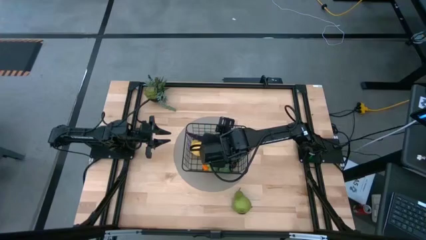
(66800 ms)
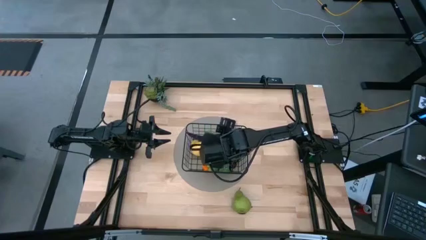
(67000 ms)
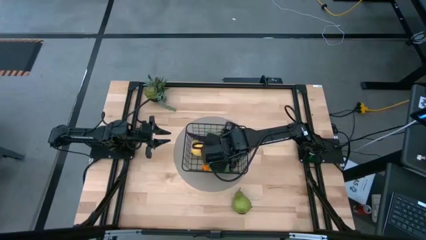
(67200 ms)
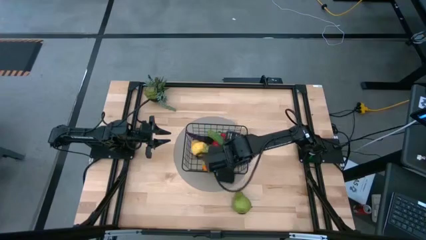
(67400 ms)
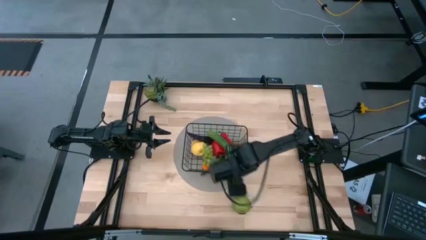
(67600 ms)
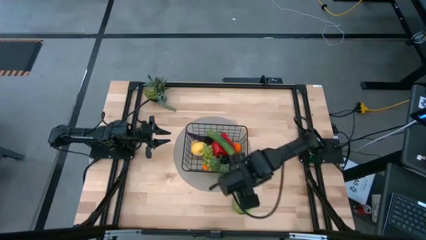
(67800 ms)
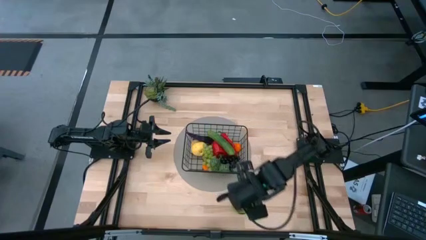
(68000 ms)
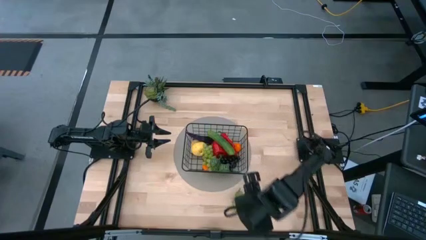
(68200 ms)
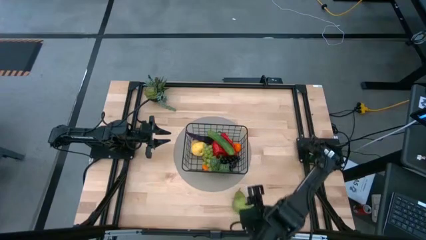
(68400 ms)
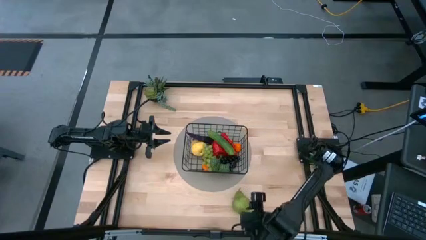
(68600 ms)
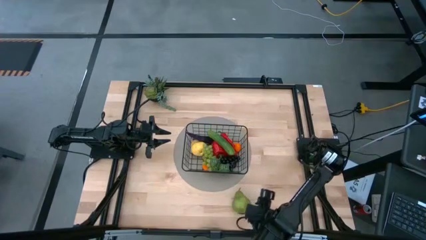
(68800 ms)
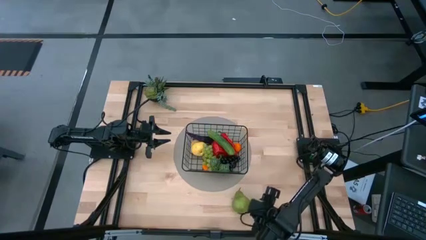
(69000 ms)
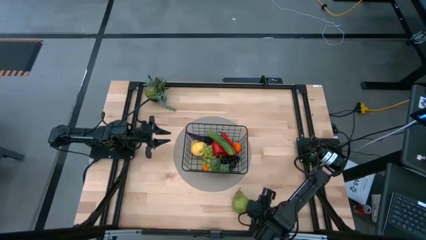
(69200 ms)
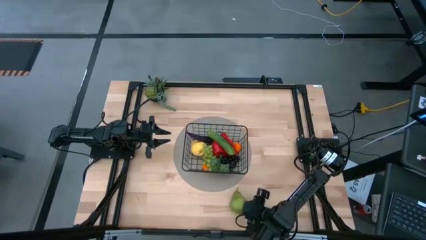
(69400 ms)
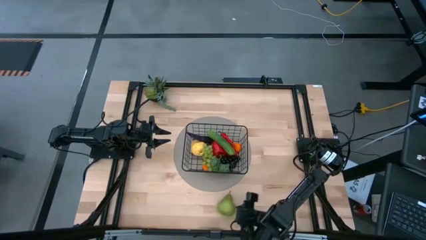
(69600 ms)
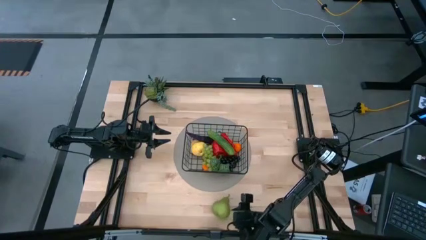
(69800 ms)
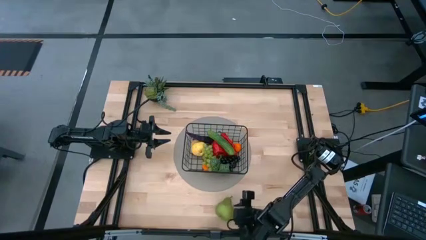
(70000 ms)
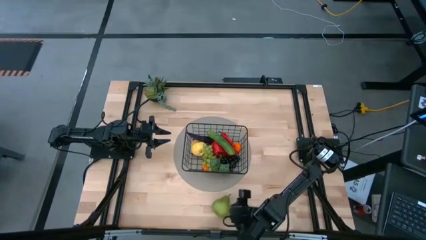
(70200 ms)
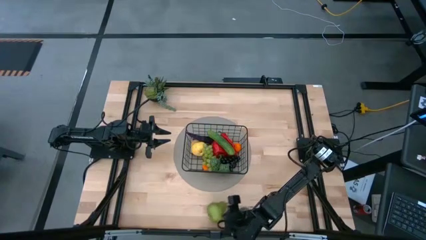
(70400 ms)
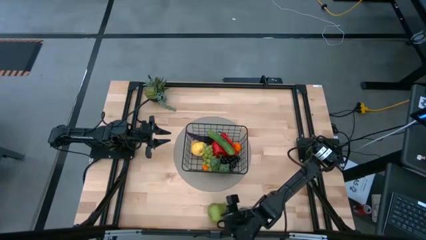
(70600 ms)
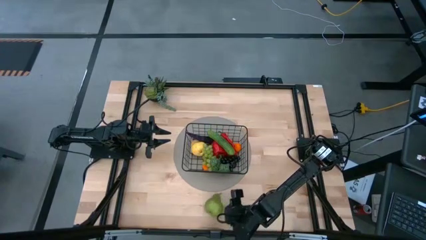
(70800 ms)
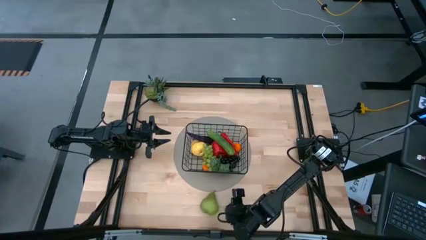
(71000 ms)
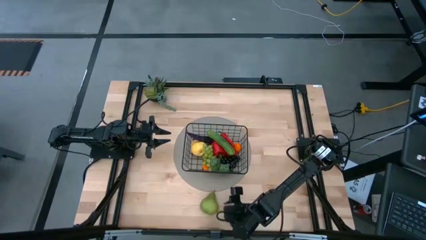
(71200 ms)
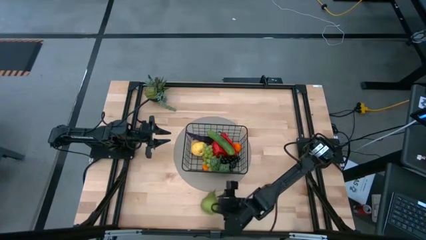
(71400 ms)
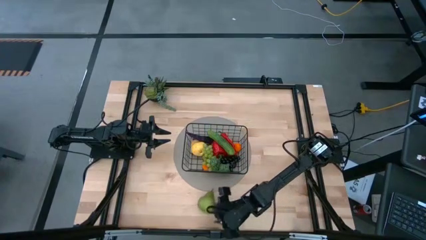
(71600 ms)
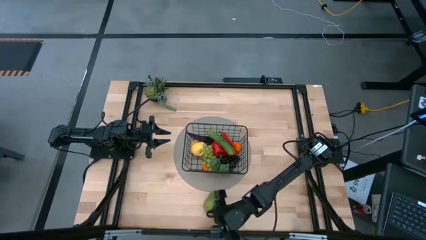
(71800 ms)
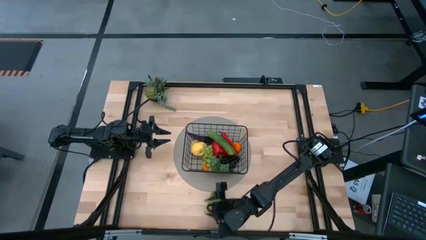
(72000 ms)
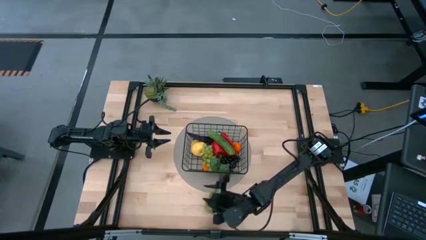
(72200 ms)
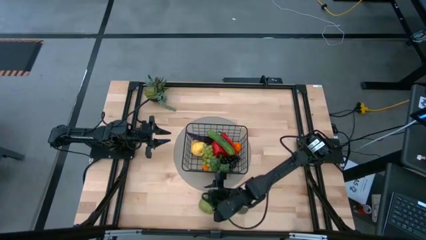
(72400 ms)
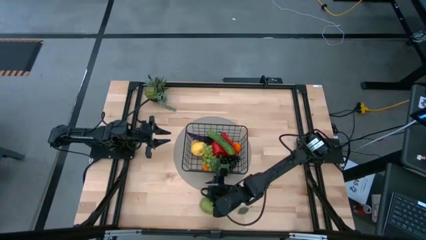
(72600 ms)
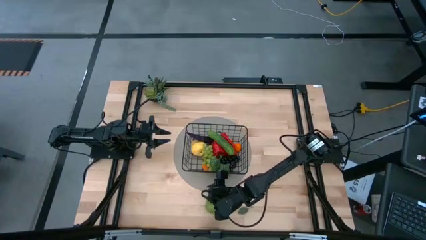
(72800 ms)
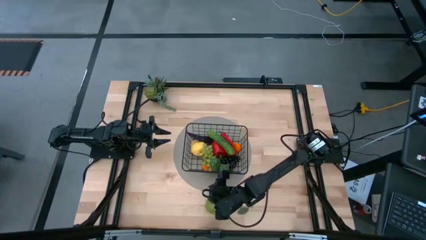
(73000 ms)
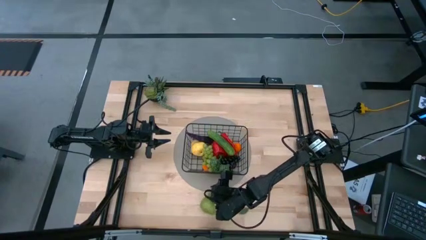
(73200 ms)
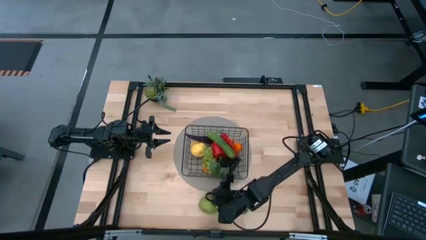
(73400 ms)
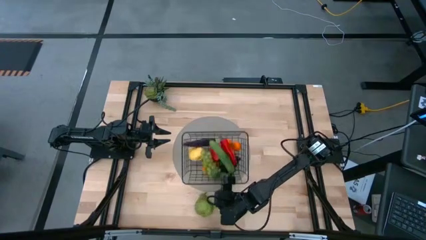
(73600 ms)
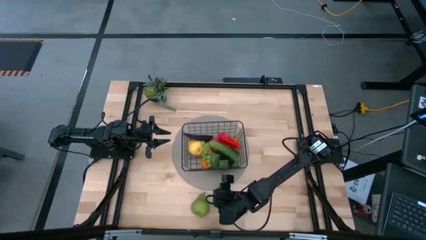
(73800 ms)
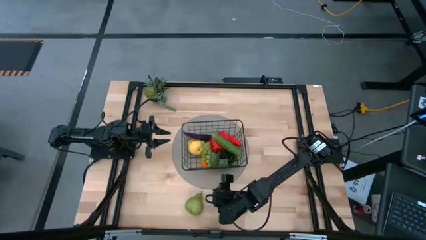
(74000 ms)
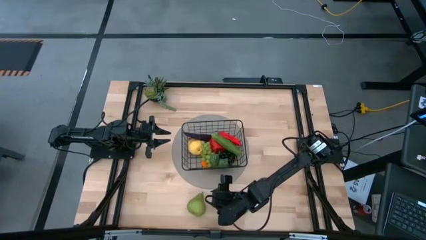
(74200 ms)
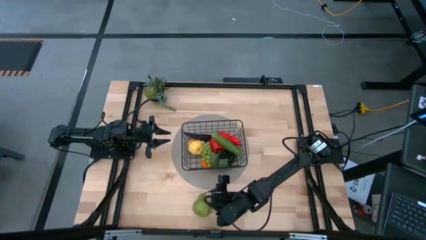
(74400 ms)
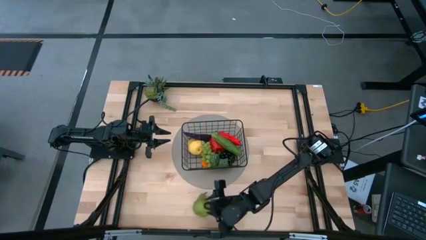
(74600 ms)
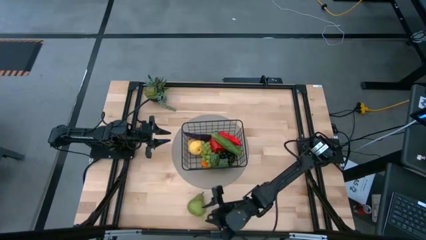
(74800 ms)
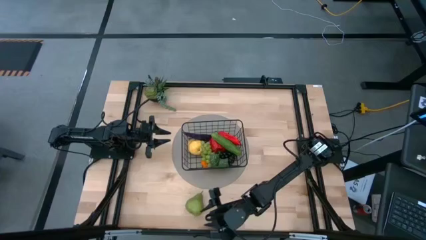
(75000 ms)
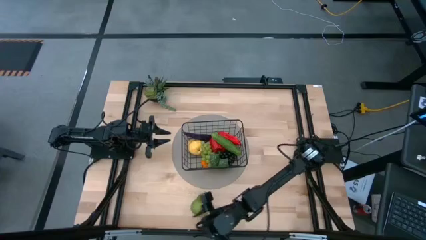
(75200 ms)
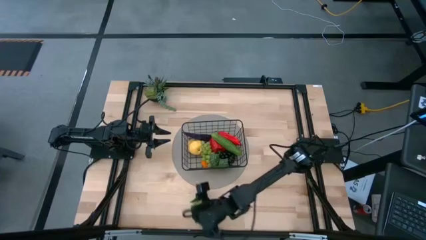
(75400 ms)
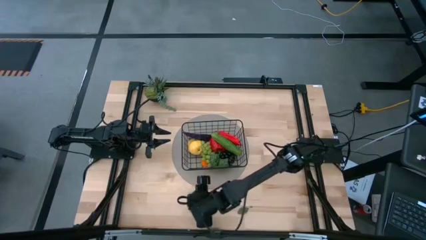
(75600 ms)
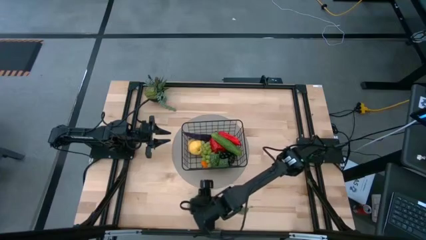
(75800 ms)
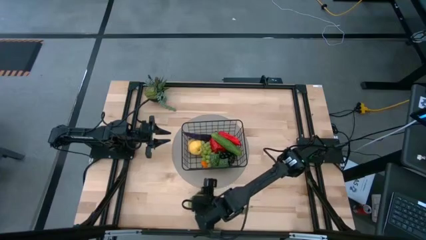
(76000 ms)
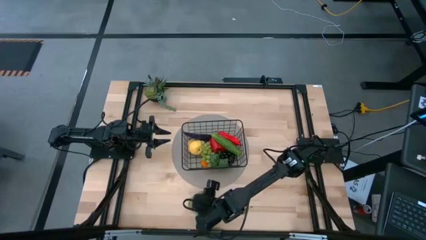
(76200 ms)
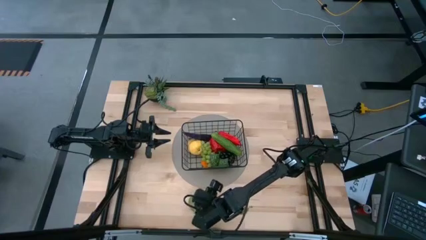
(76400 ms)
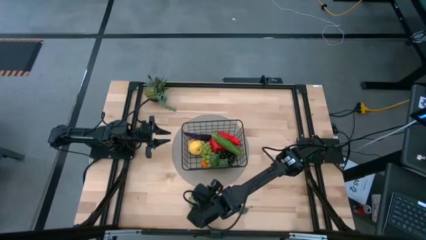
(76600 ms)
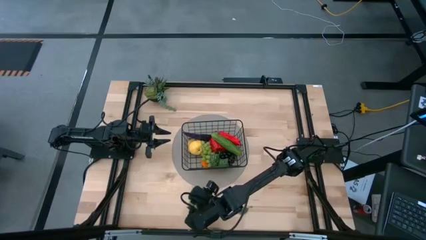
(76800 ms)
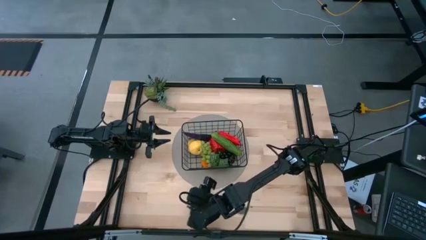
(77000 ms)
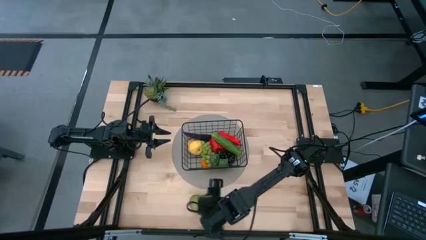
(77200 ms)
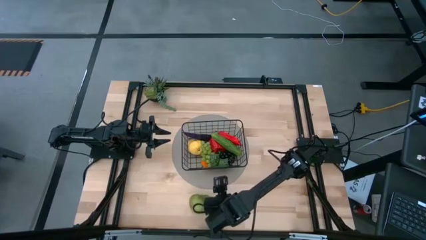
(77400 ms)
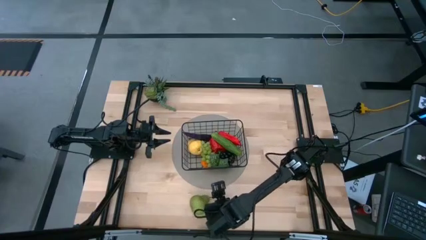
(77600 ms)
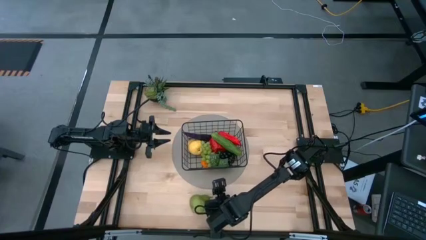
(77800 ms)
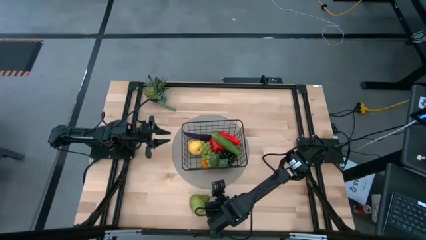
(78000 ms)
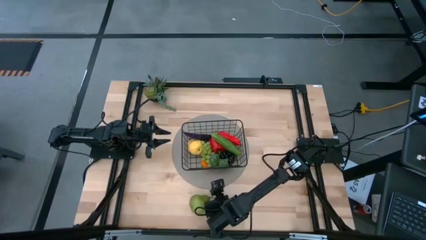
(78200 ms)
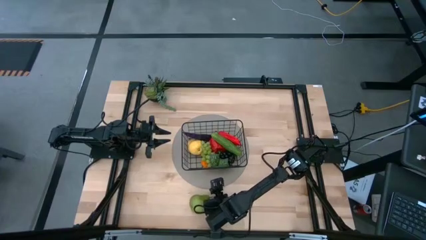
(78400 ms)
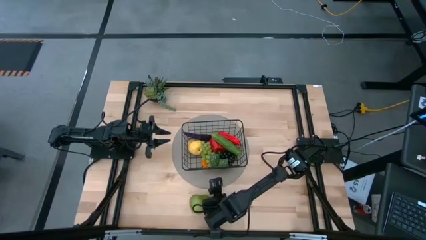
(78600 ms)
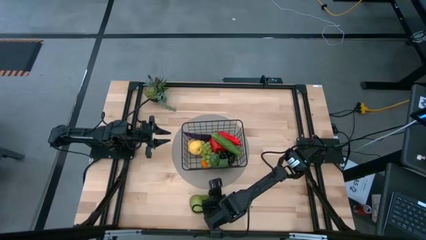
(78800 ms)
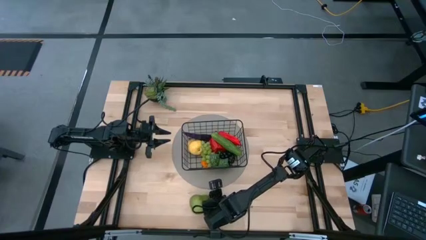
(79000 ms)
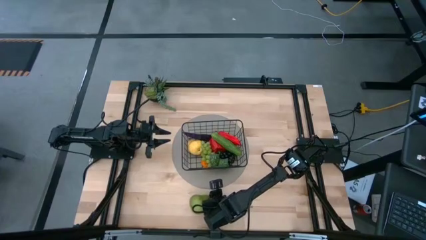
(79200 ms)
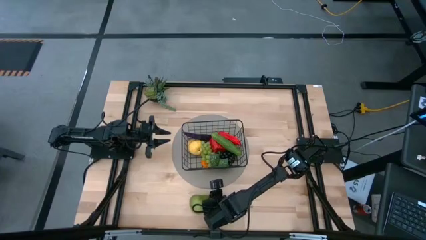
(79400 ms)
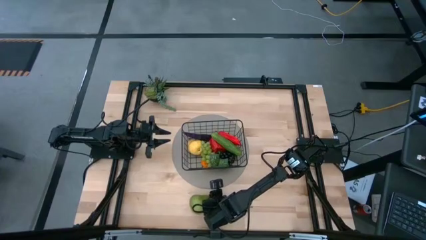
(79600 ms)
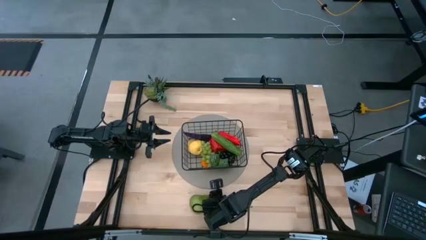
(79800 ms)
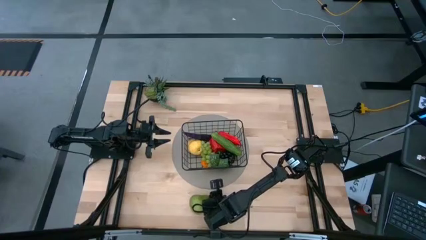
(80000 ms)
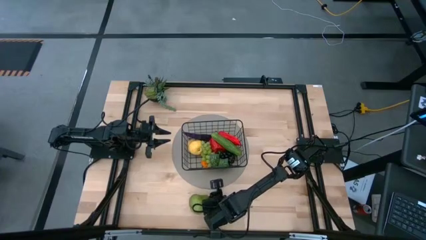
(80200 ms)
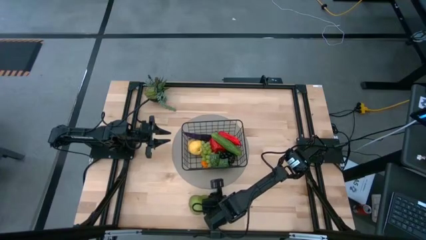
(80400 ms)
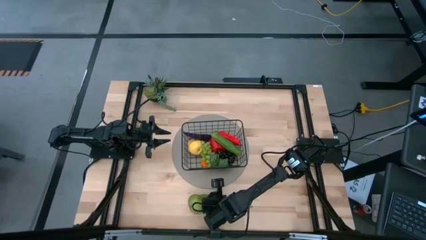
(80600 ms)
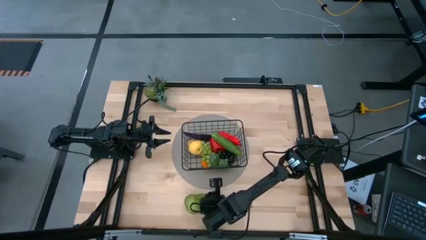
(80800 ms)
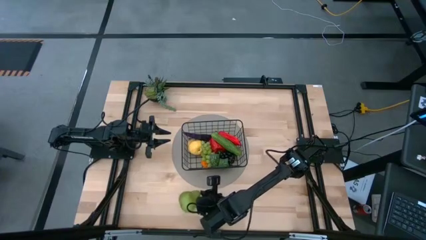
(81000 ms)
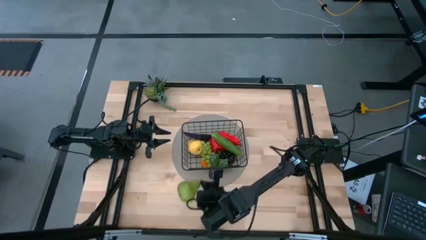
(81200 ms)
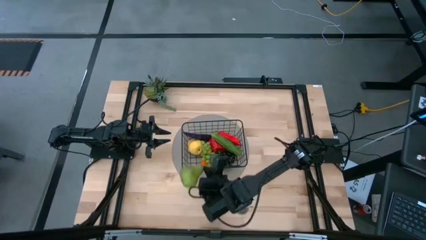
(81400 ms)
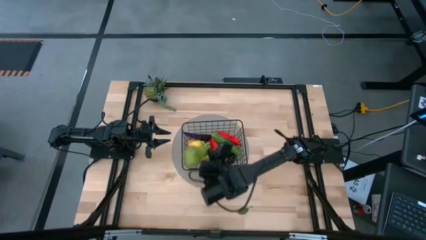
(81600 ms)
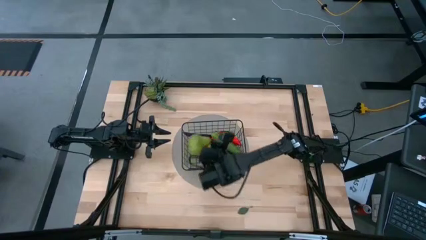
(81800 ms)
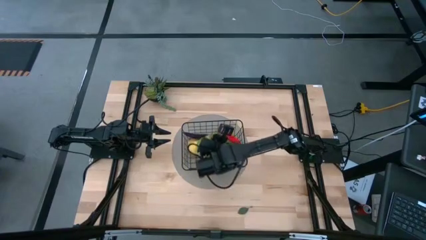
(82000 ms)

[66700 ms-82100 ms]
Task: Build produce basket
Put the green pear into the black wire basket

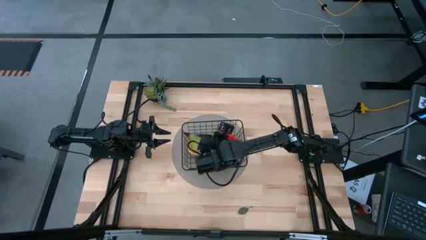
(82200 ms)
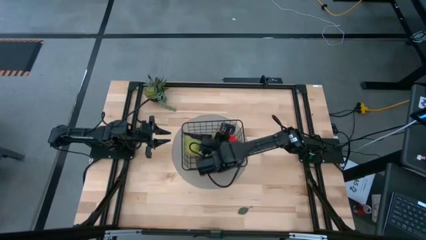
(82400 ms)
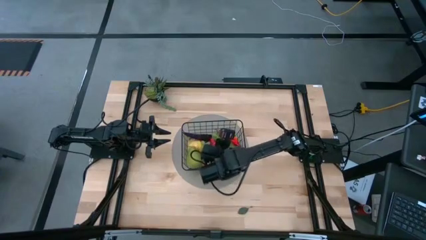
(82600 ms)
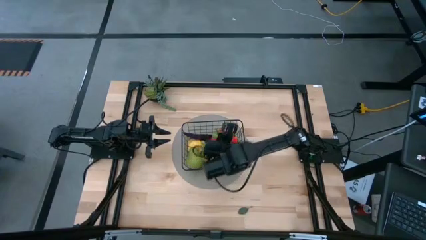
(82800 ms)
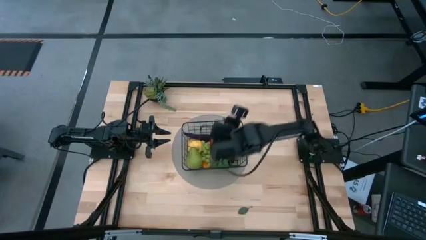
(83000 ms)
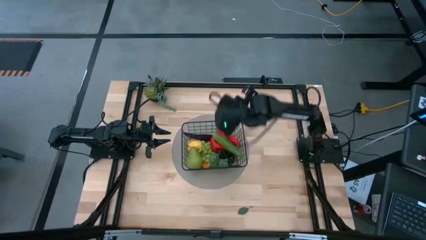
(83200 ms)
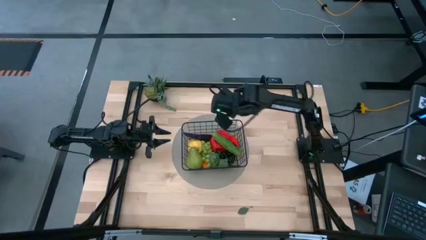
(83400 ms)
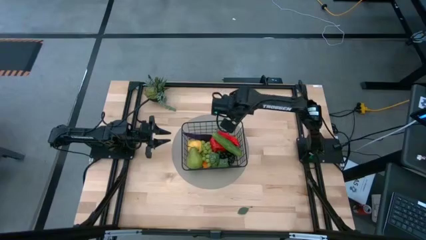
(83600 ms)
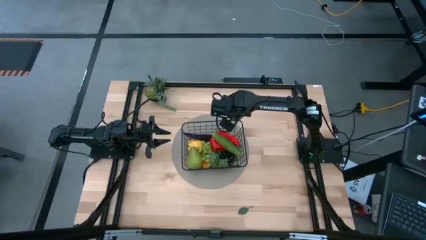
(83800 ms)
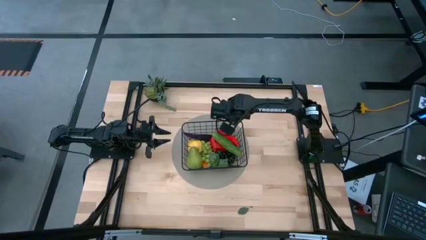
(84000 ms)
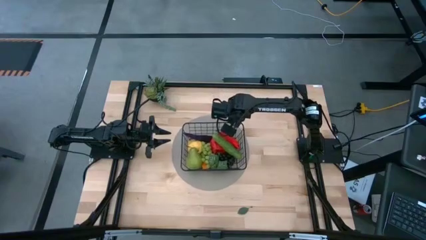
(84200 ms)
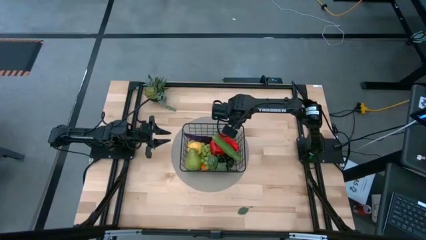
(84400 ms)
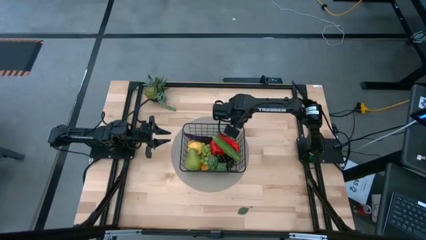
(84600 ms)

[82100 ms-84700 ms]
Adjust the black wire basket
